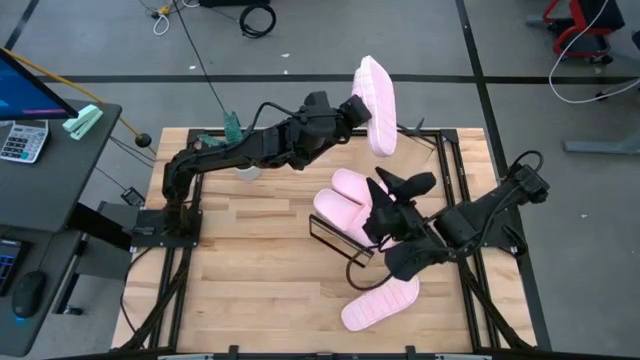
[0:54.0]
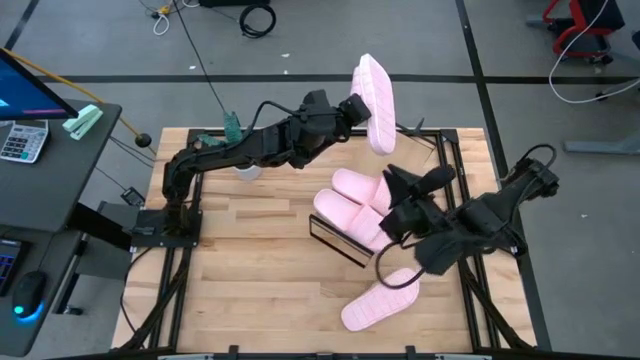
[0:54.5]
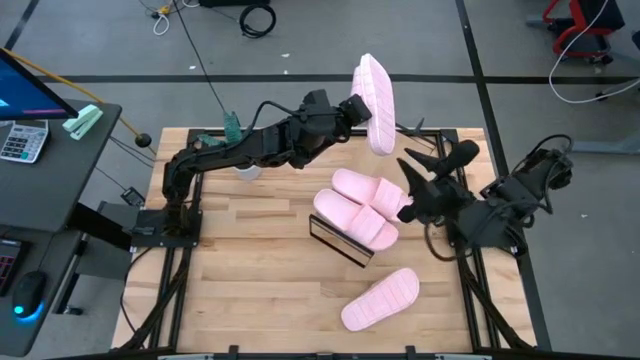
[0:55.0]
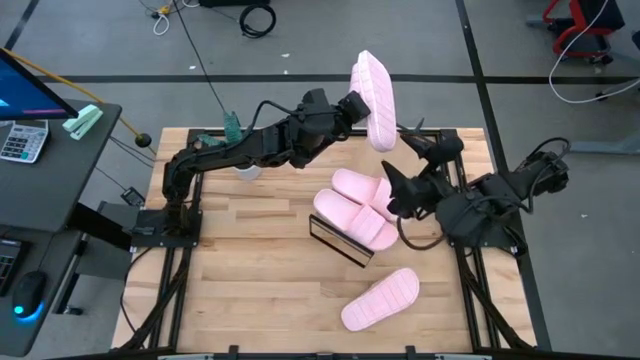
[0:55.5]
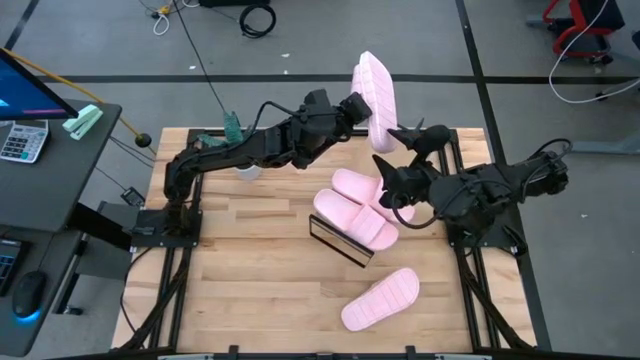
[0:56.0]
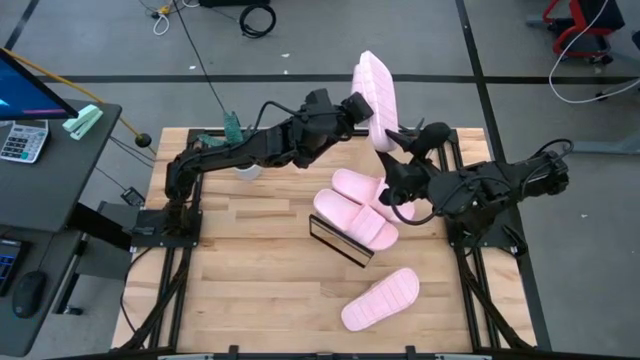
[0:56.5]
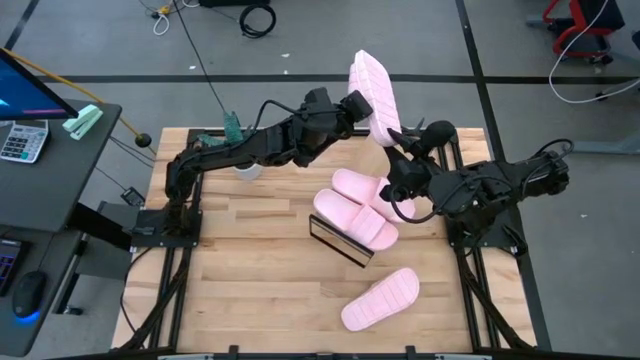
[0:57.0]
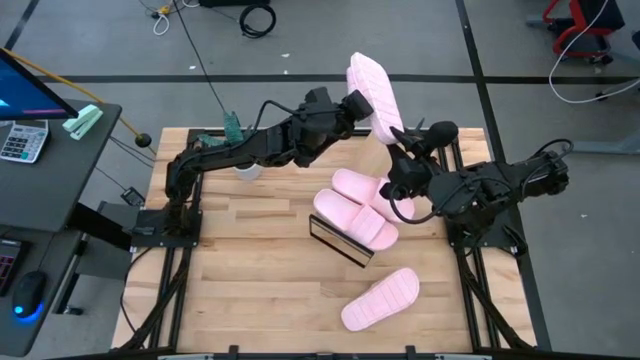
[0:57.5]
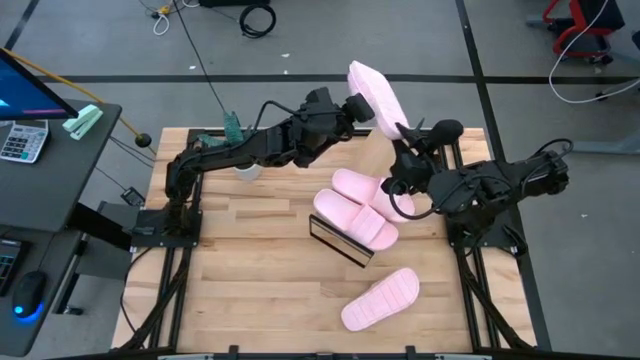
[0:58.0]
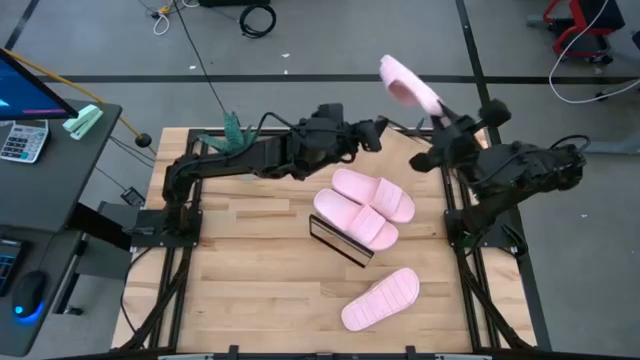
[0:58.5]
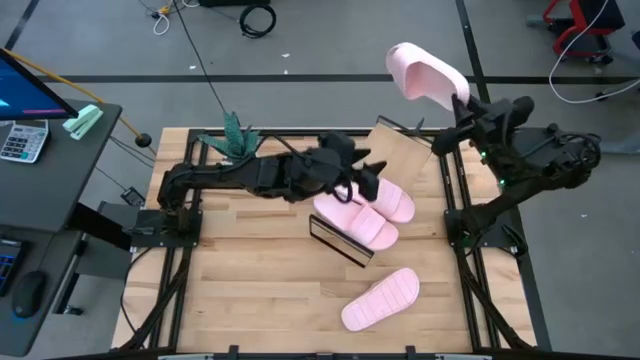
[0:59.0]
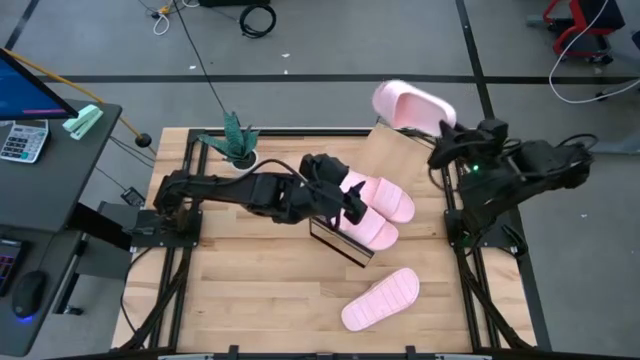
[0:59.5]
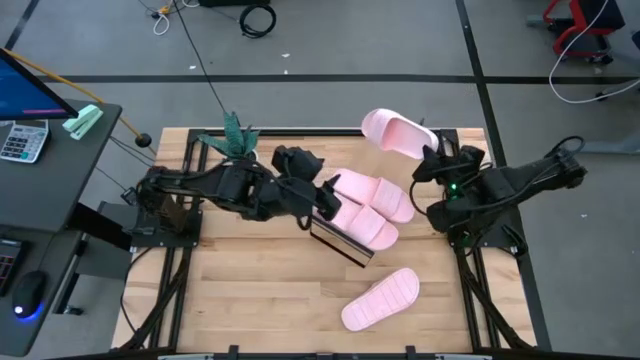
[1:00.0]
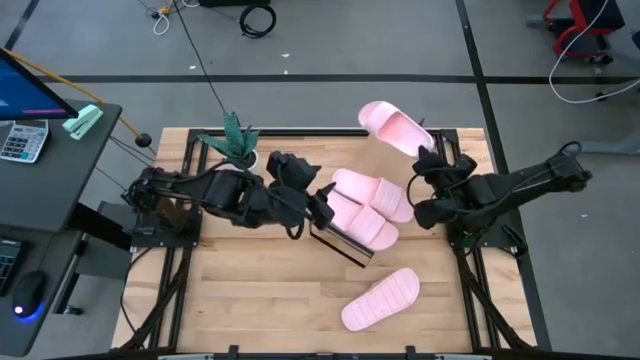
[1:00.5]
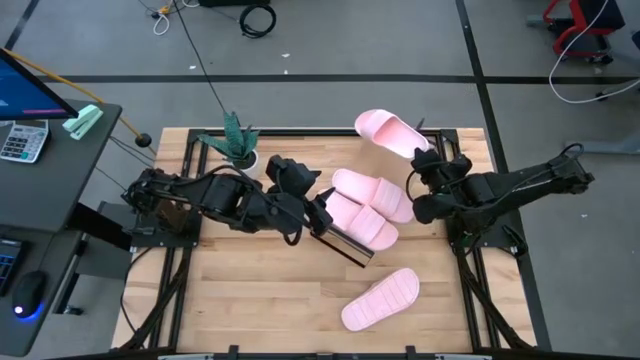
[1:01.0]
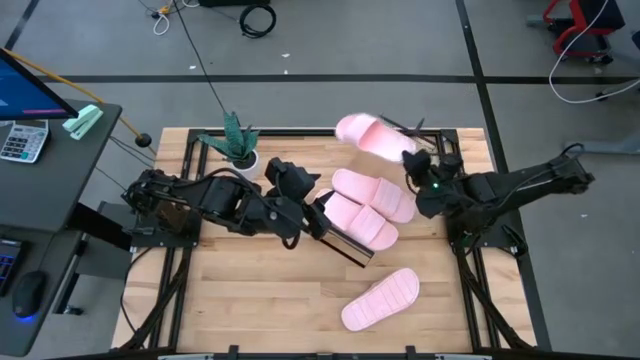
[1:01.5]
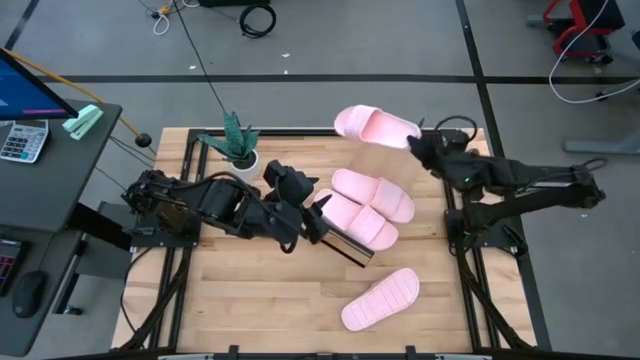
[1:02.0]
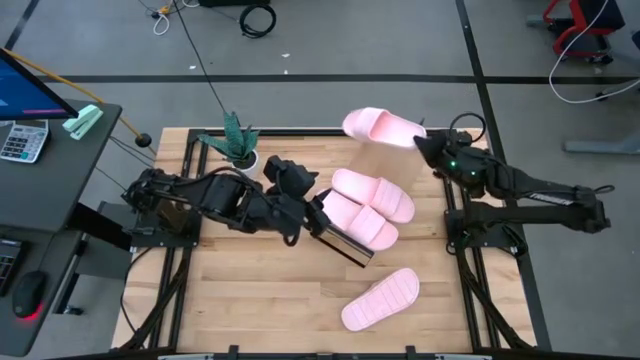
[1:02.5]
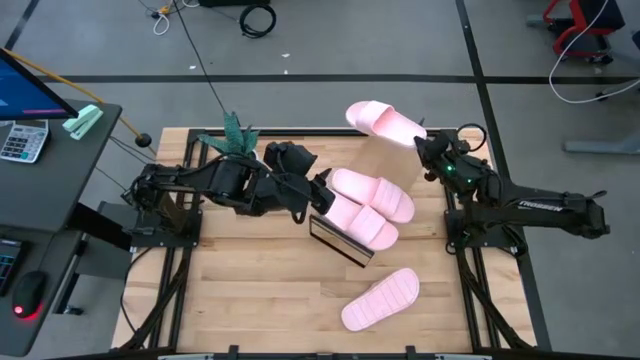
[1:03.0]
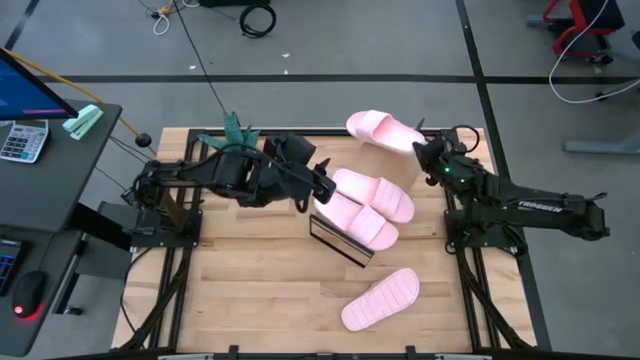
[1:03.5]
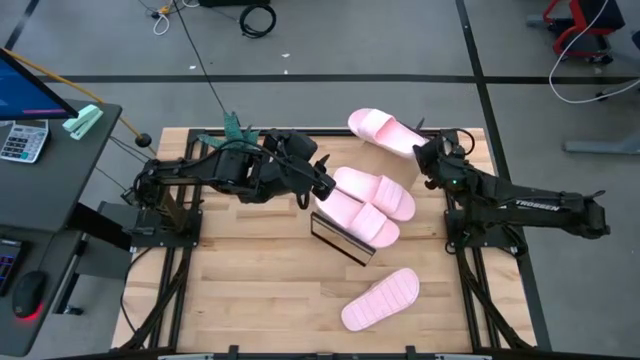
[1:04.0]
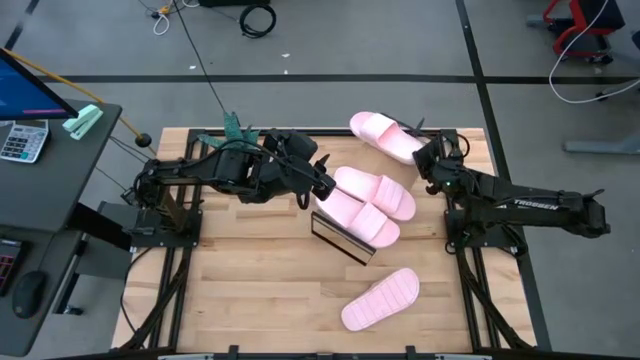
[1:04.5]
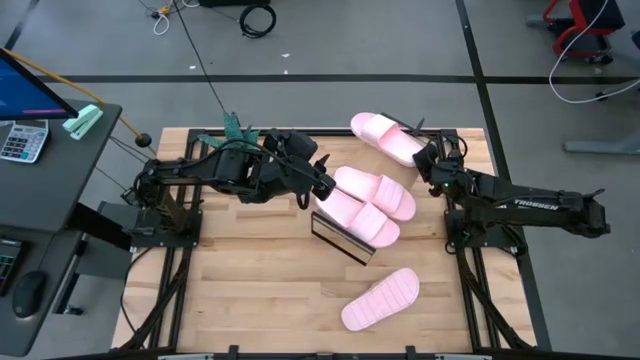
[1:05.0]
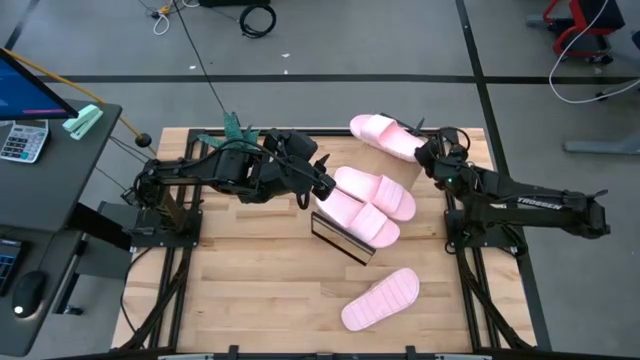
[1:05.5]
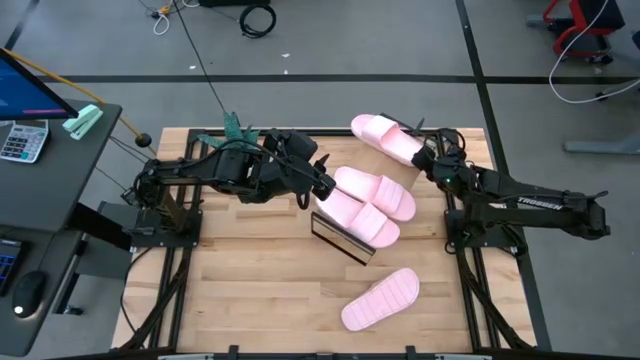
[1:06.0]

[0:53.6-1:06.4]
Task: Pick and place slides into the shelf
Put the pink slide on the shelf

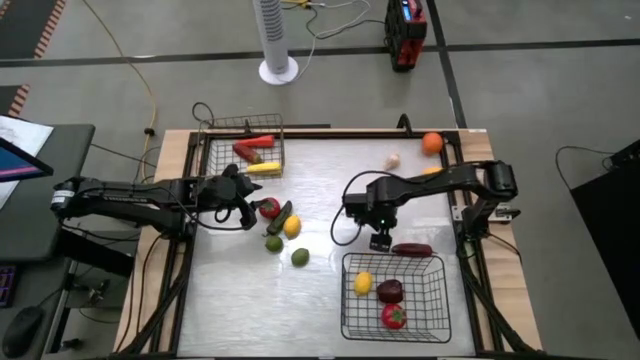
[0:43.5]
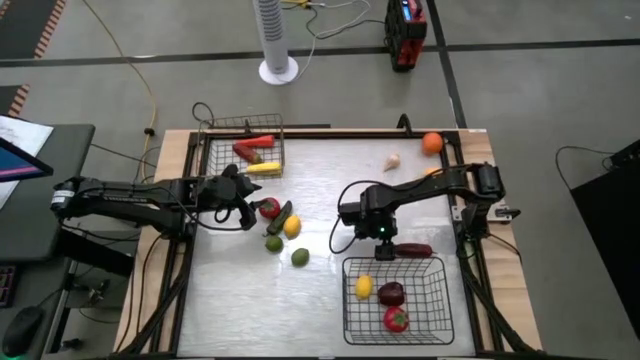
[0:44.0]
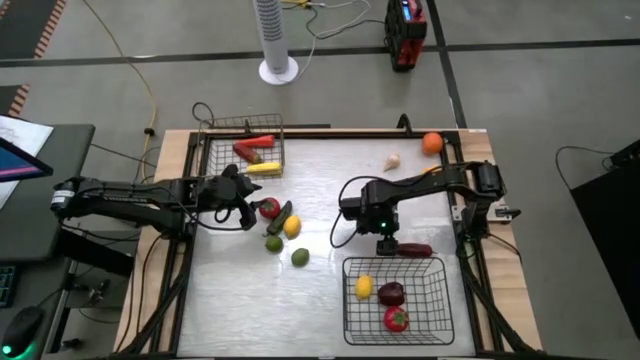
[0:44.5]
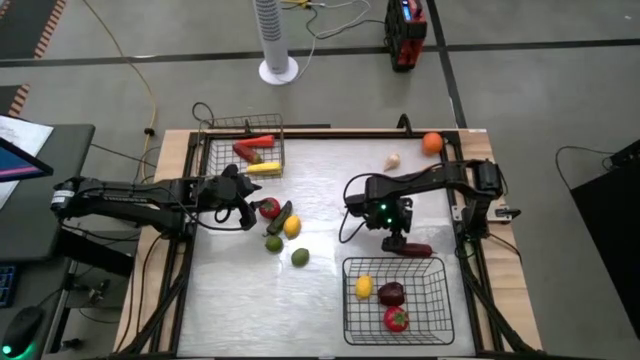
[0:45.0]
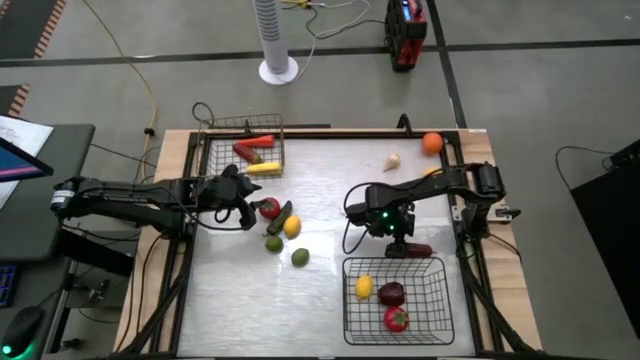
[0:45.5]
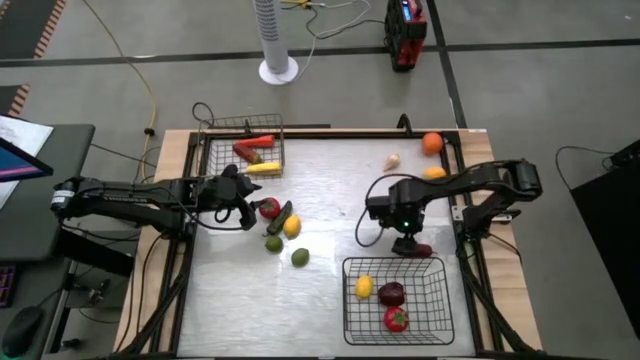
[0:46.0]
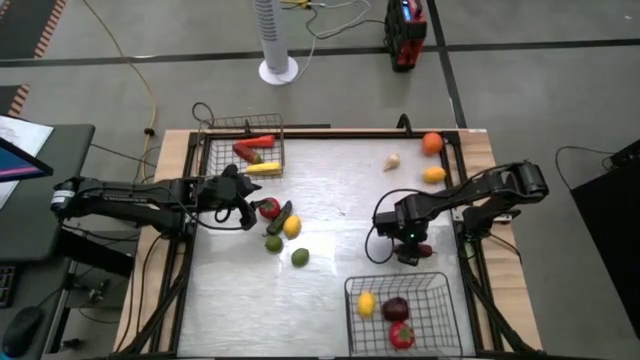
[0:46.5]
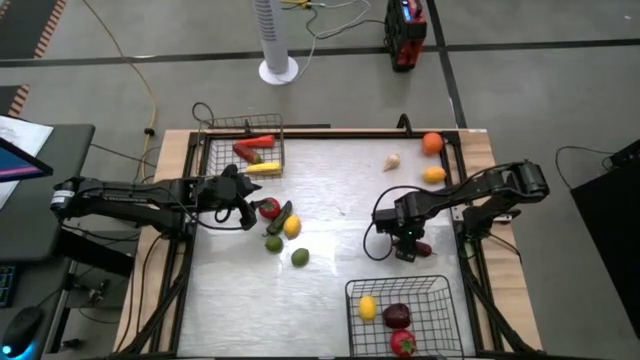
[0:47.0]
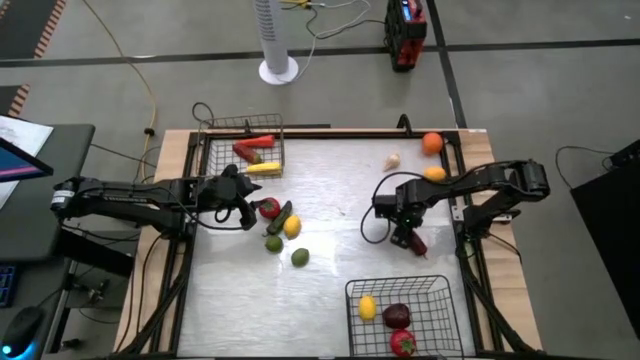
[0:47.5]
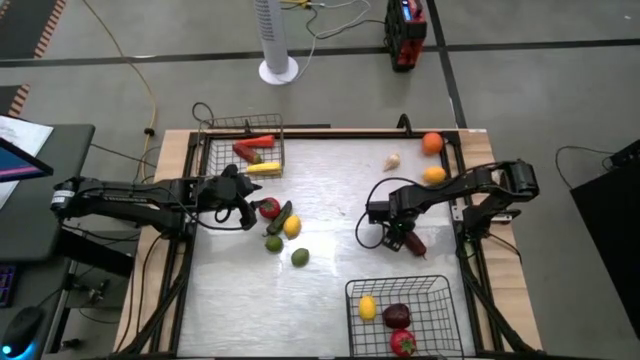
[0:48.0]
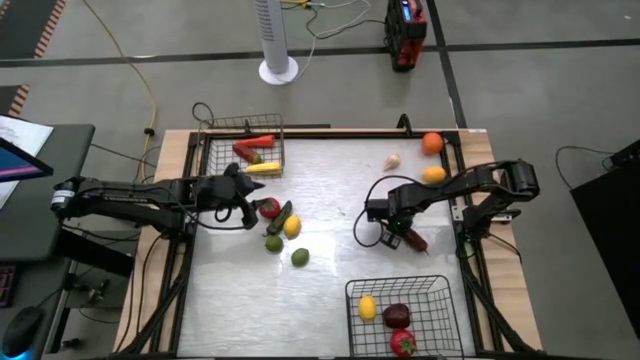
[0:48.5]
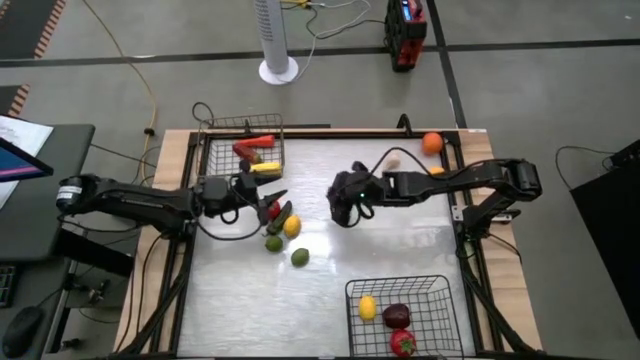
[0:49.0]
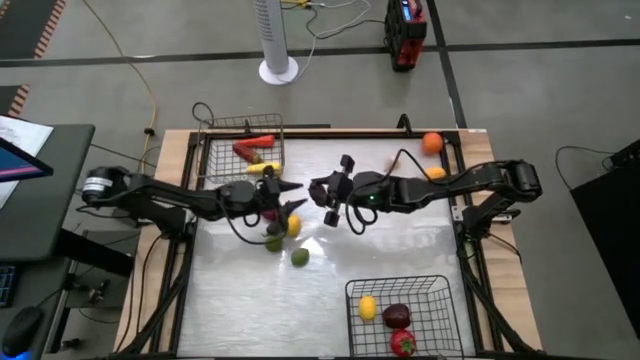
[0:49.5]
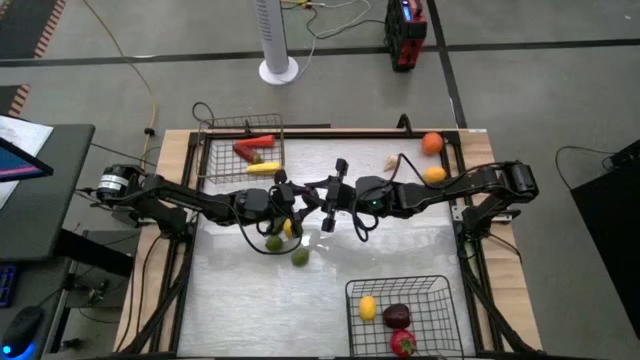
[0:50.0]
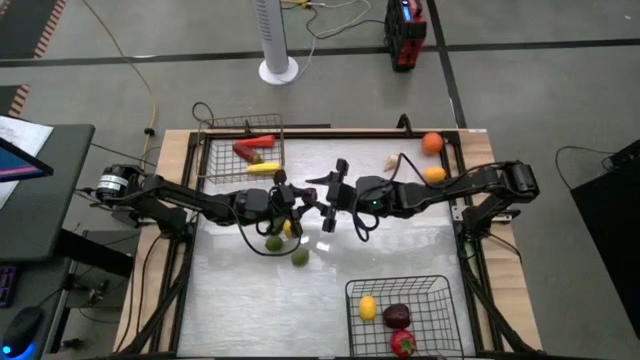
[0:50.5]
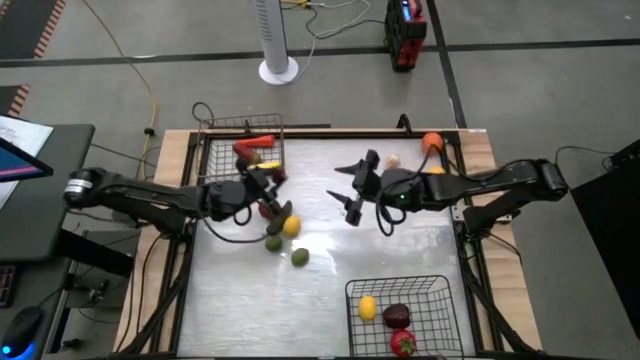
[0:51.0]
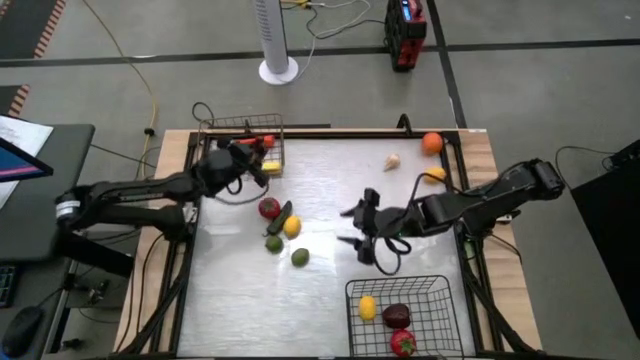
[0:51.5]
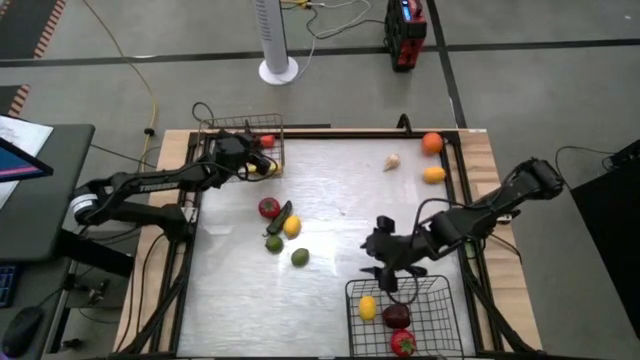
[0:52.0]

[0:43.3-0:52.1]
Task: Sort produce into baskets
Put the chili pepper into the top wire basket
